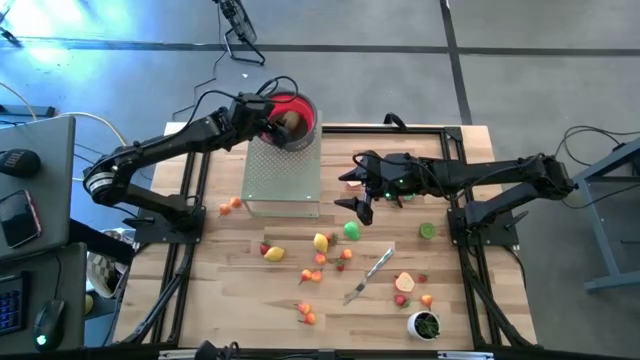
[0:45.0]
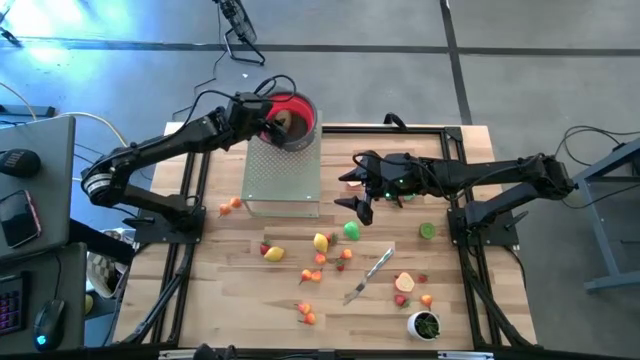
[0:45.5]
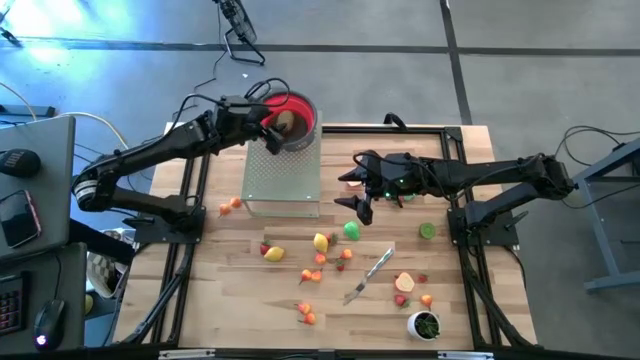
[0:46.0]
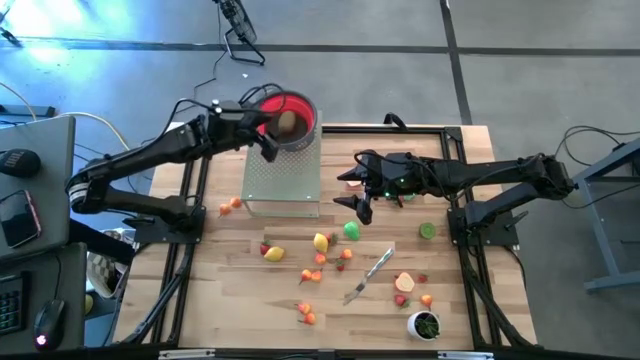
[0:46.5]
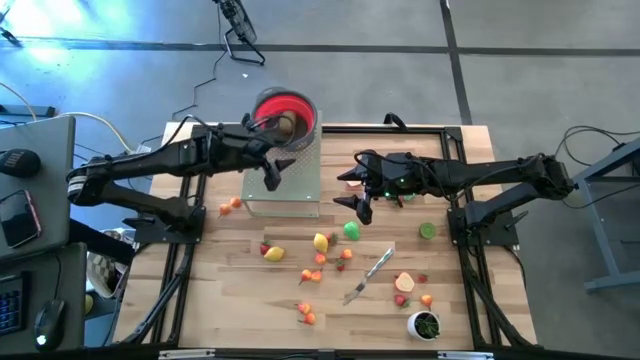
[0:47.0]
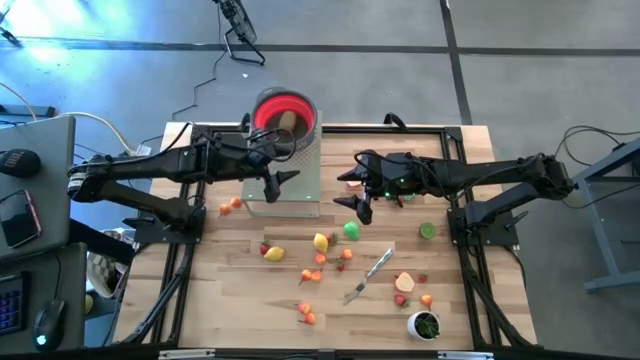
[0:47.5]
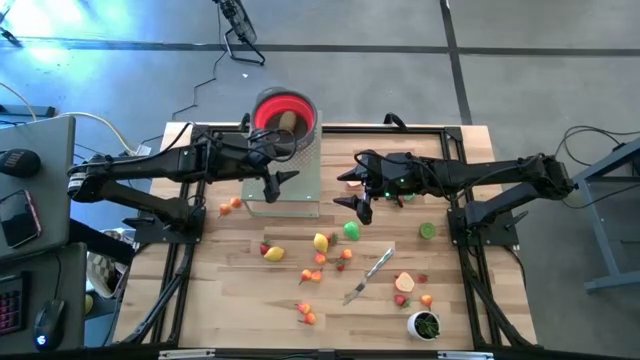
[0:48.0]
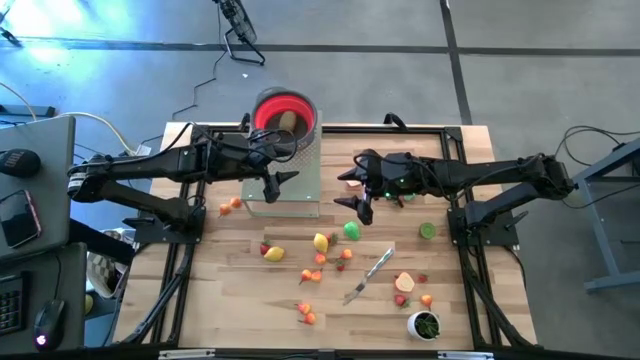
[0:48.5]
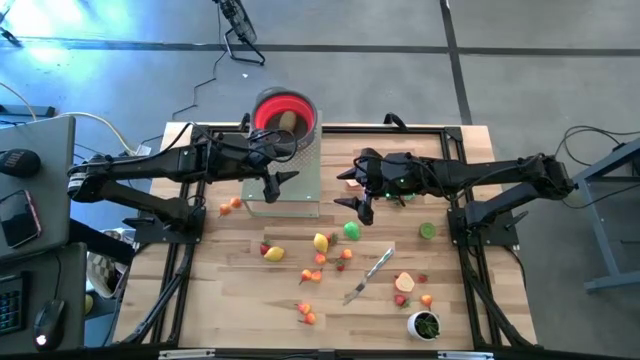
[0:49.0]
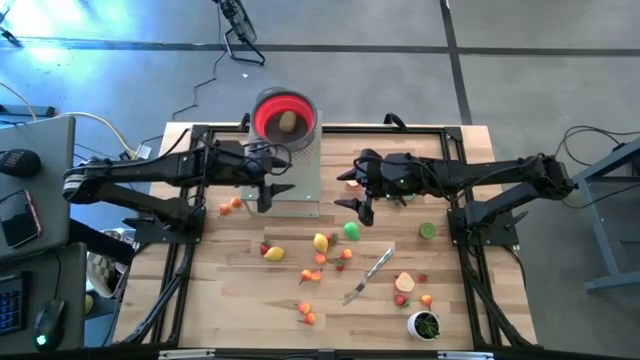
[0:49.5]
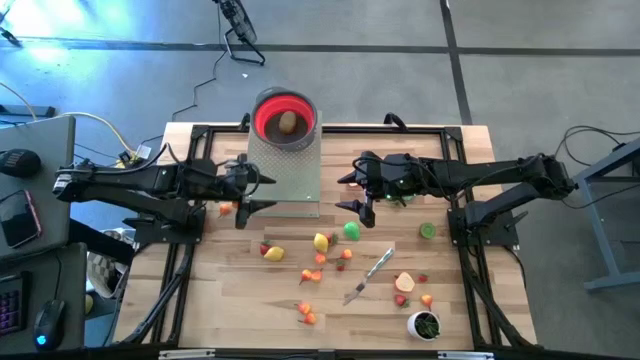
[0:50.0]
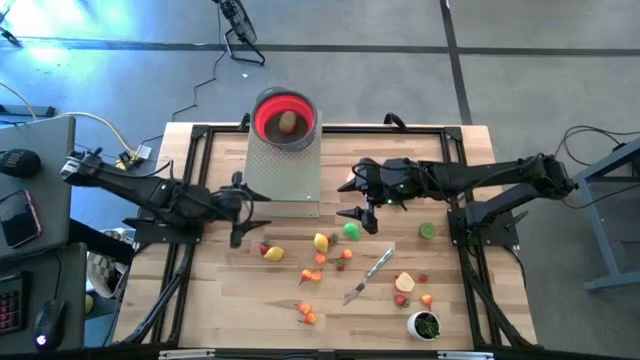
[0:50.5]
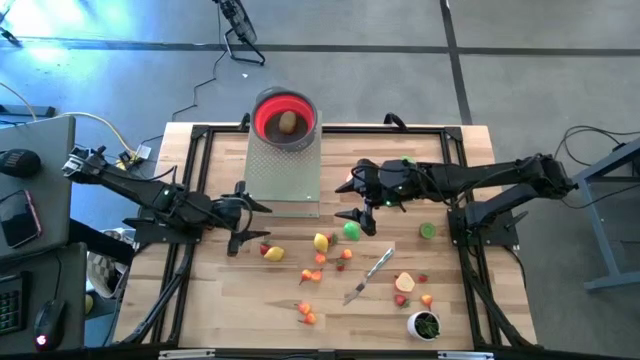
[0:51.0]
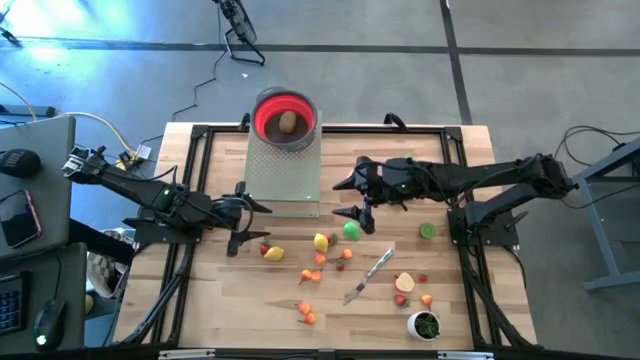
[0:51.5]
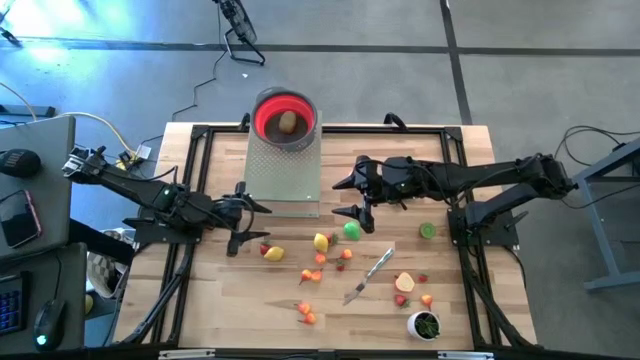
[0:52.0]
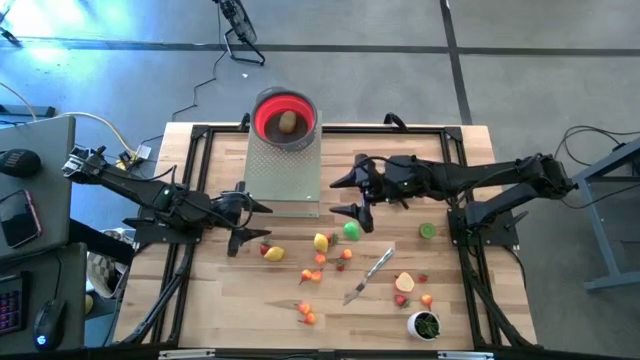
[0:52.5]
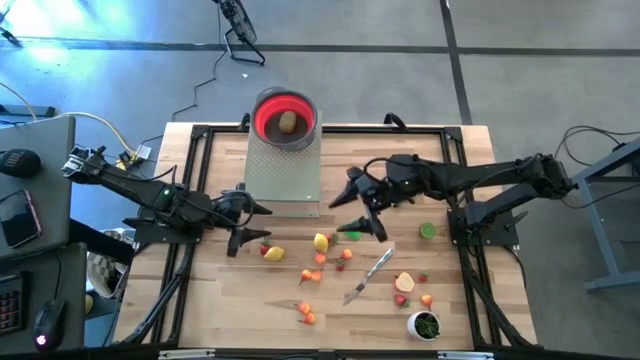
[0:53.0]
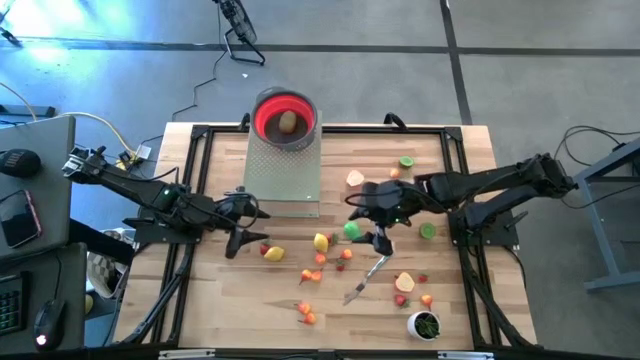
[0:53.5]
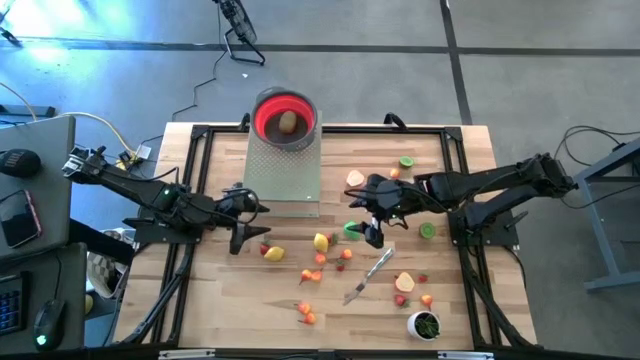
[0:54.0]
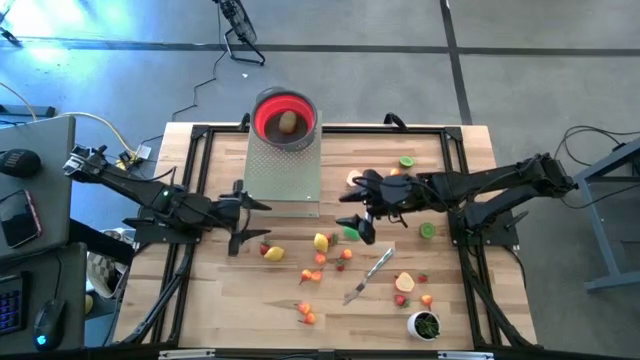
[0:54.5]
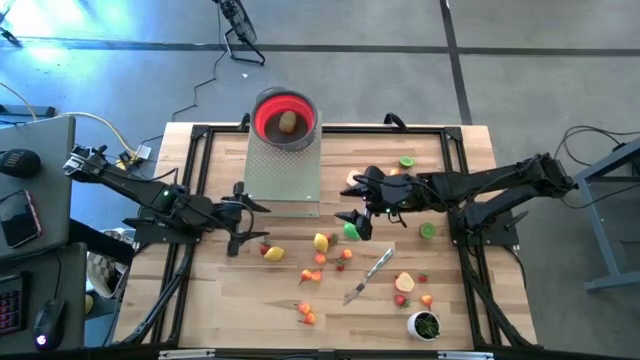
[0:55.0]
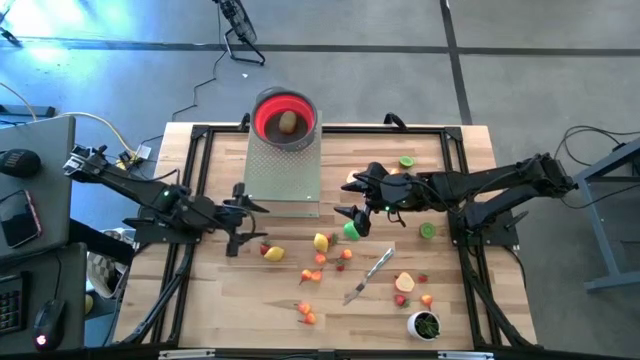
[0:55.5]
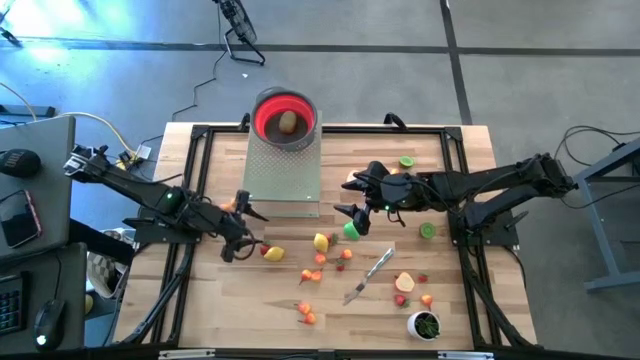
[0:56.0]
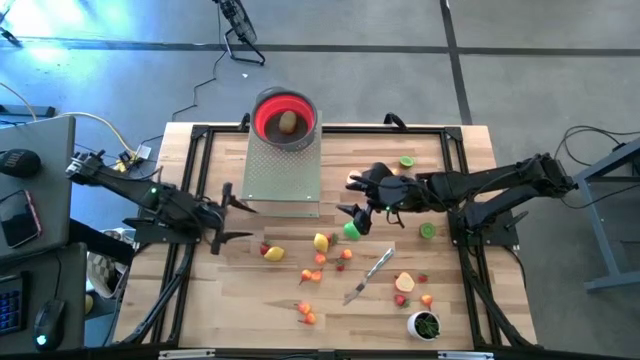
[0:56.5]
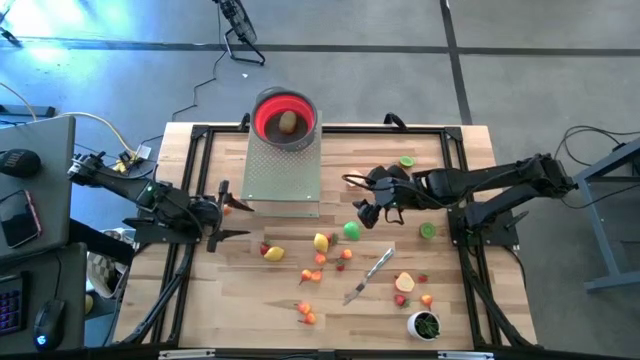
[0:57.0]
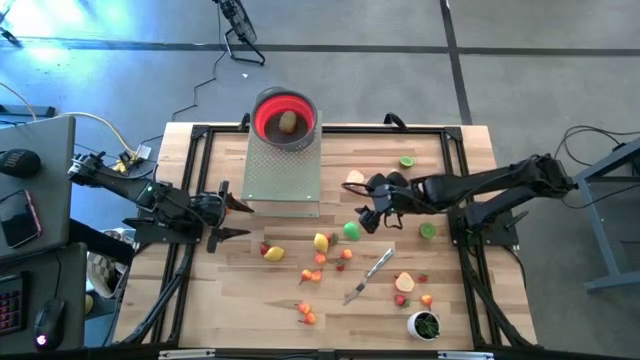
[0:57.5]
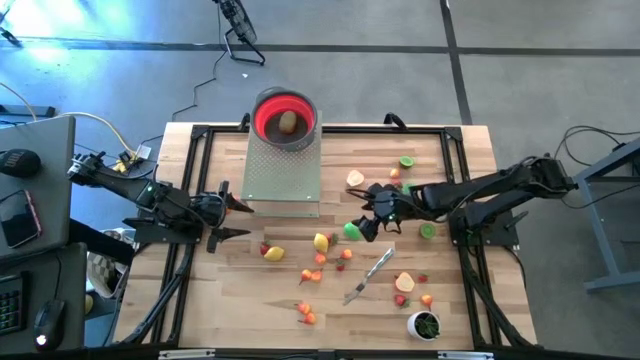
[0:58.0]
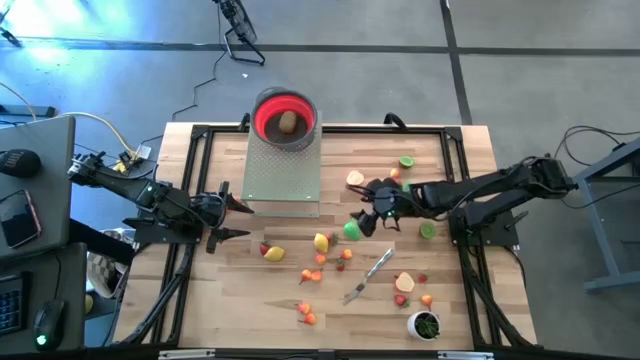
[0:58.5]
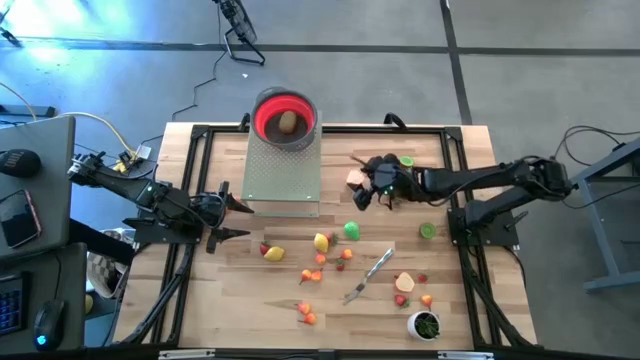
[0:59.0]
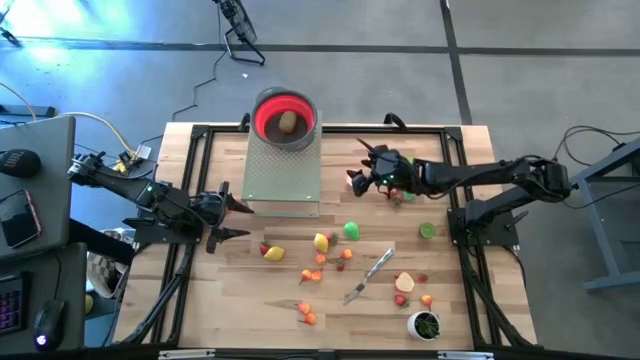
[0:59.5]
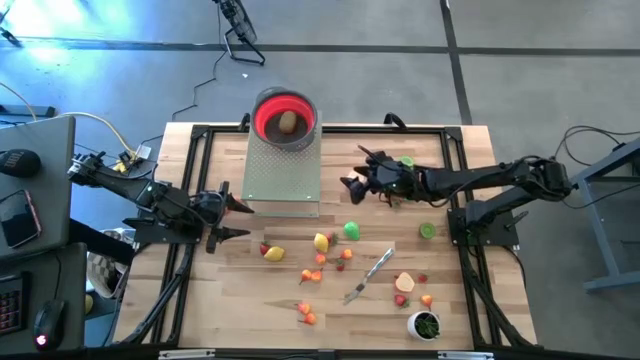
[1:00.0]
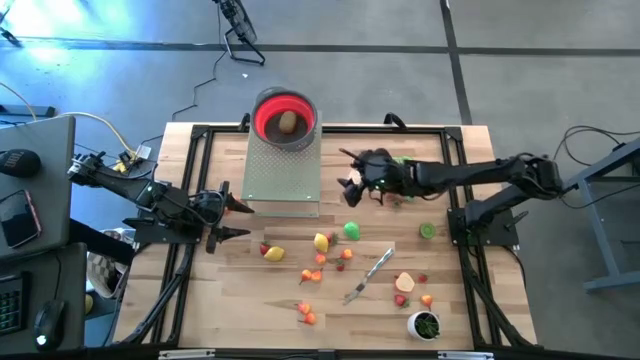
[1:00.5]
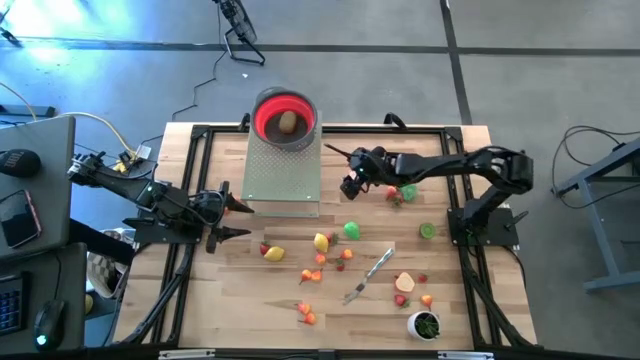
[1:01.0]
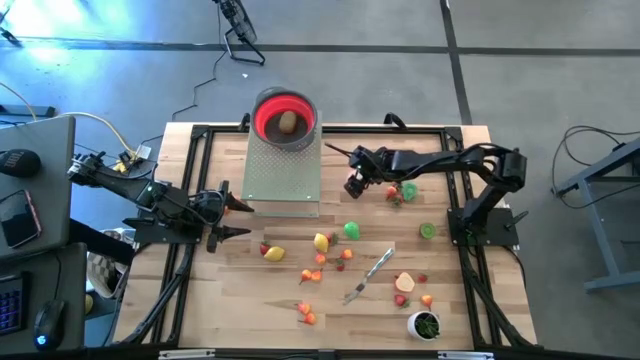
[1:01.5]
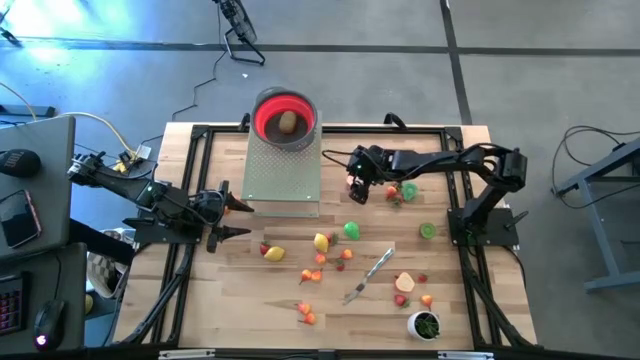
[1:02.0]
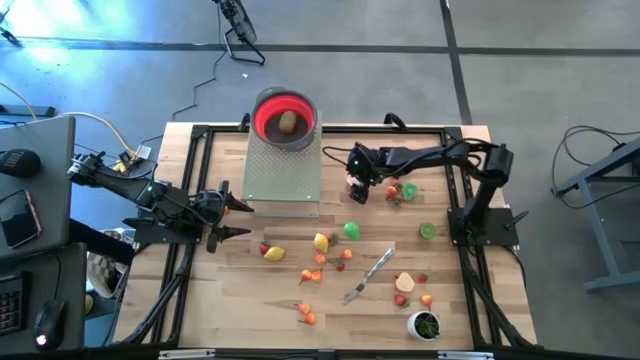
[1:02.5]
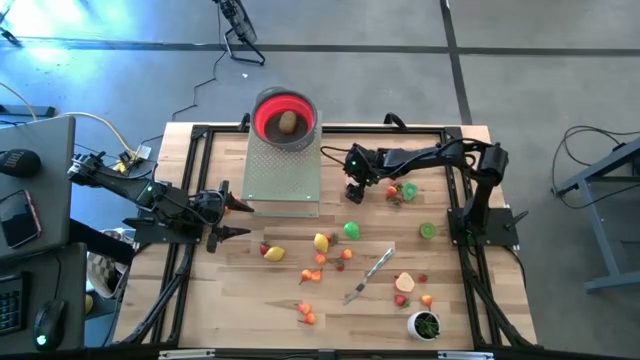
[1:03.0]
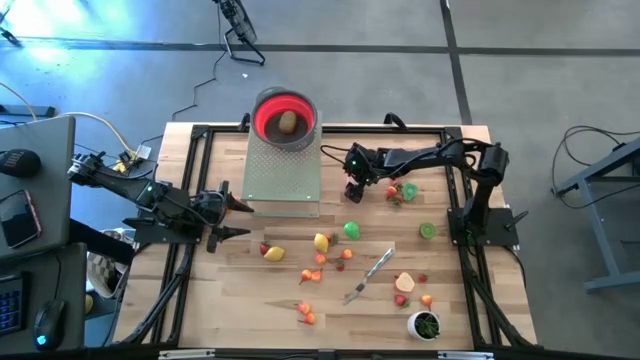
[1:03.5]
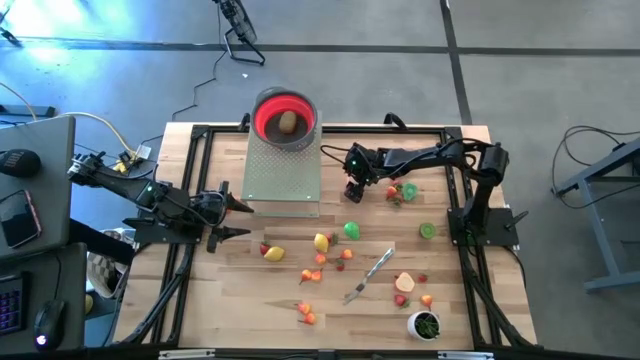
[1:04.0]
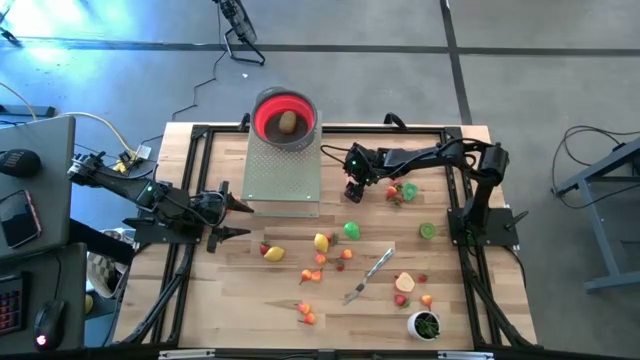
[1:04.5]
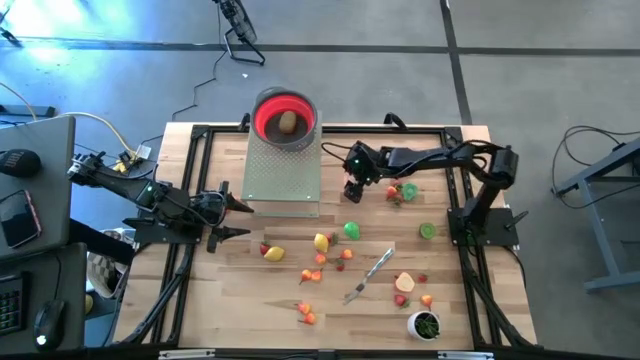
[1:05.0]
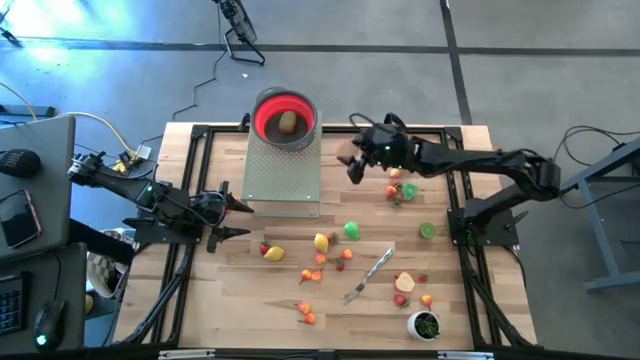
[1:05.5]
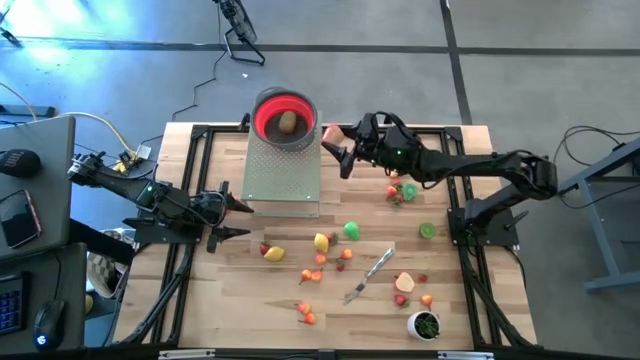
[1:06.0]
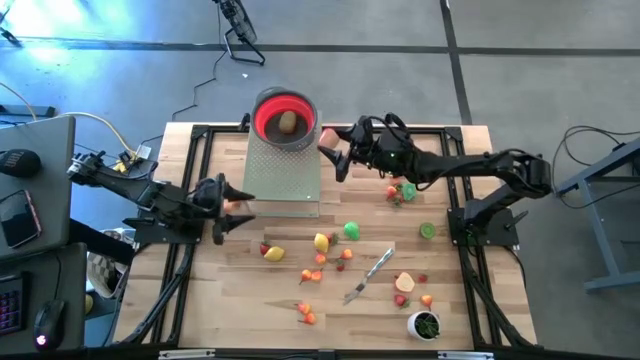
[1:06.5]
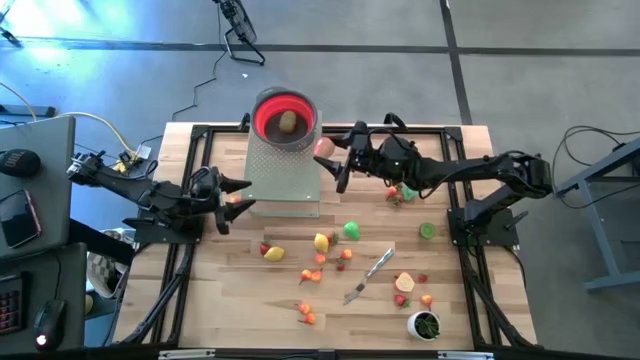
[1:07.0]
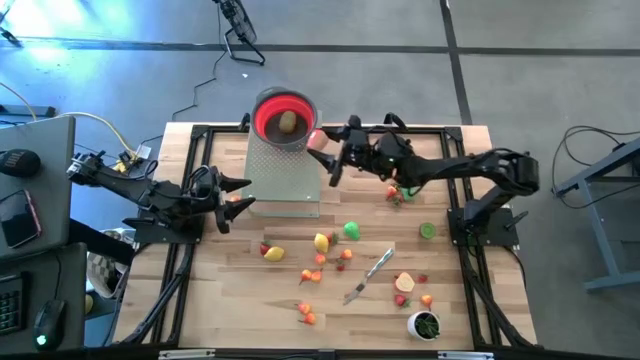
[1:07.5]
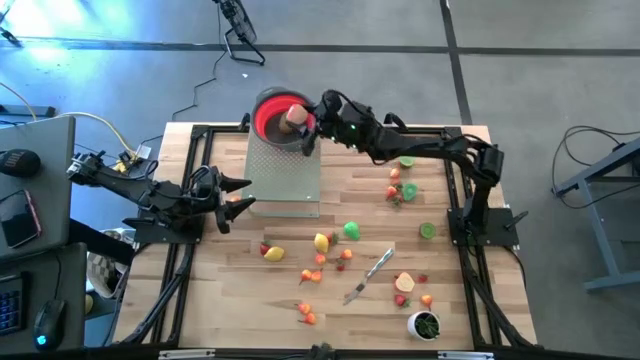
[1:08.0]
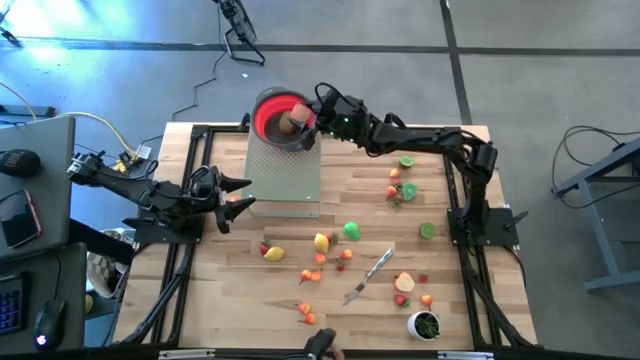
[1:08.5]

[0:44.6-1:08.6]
Task: Pick & Place Fruit
Put the half apple into the red strainer on the shelf
